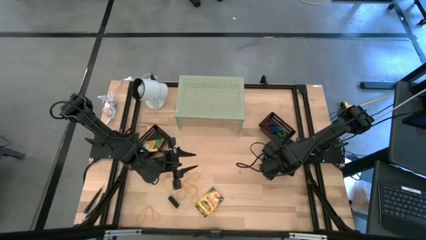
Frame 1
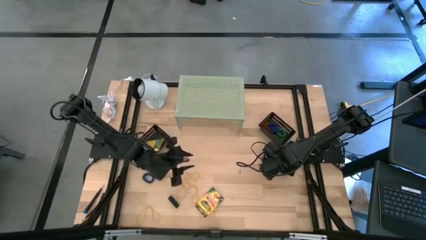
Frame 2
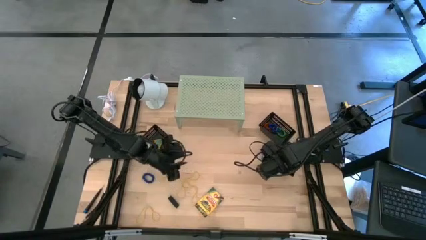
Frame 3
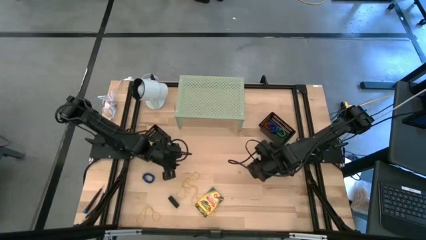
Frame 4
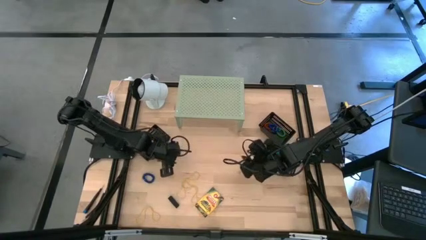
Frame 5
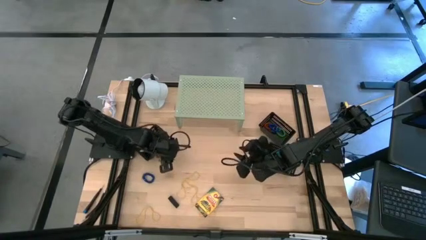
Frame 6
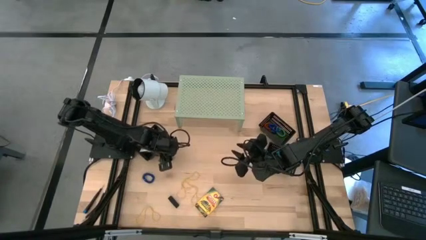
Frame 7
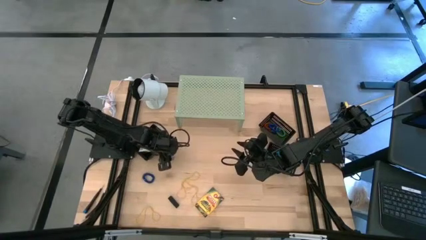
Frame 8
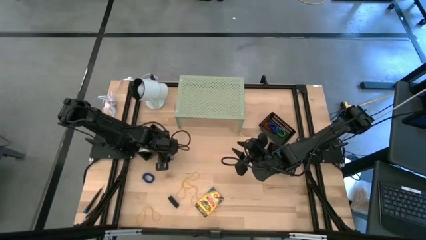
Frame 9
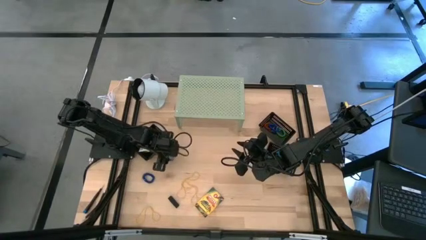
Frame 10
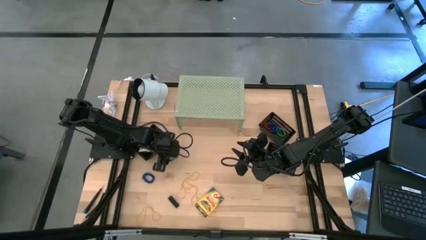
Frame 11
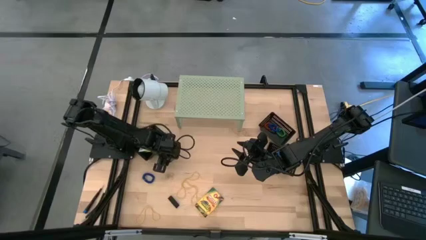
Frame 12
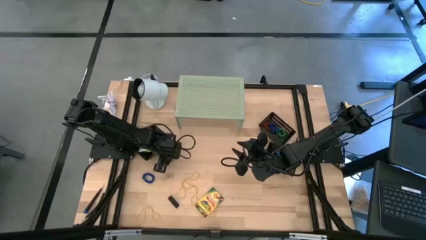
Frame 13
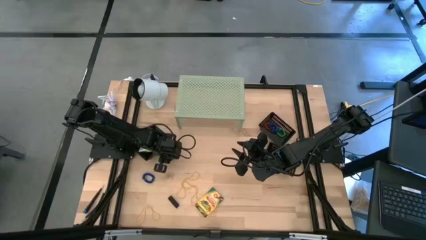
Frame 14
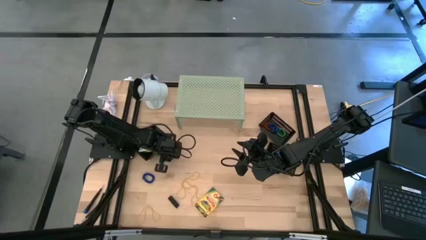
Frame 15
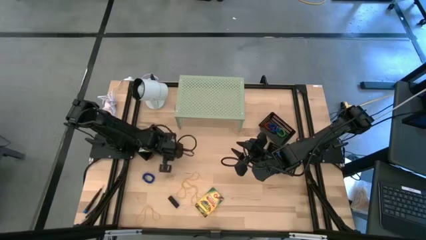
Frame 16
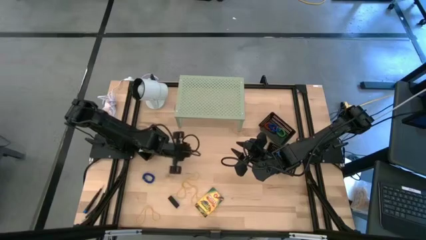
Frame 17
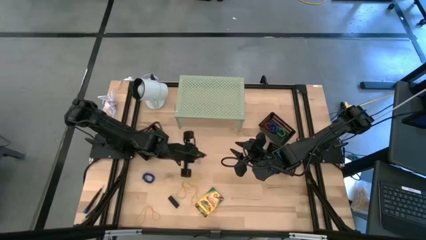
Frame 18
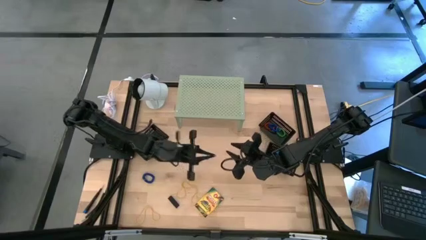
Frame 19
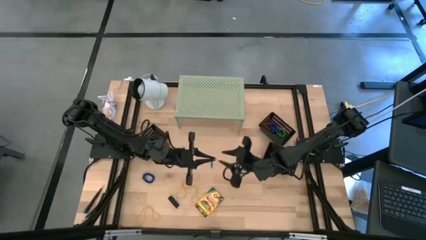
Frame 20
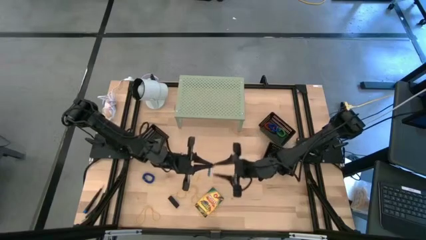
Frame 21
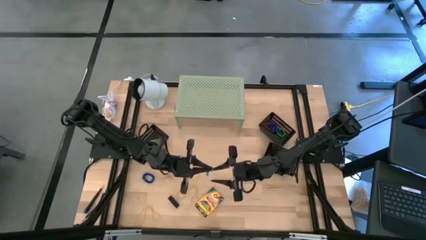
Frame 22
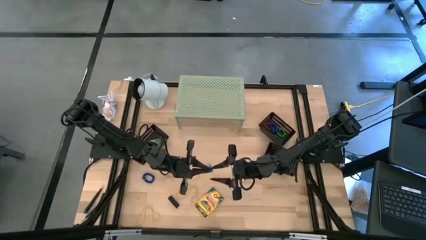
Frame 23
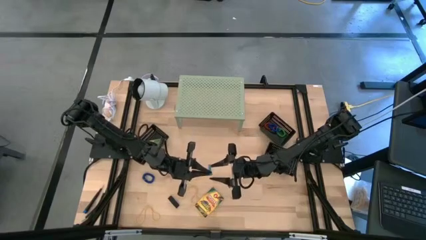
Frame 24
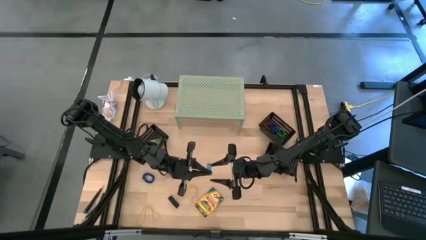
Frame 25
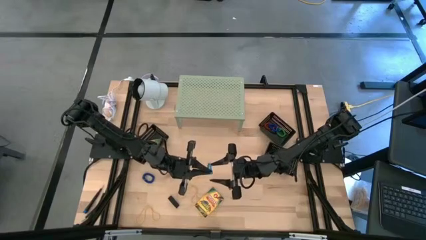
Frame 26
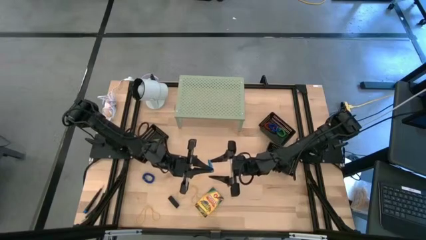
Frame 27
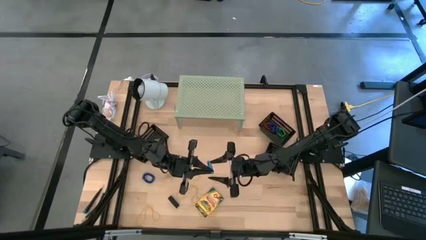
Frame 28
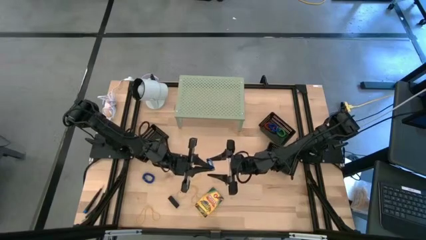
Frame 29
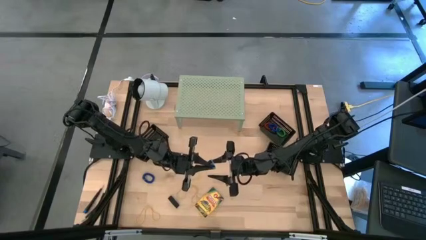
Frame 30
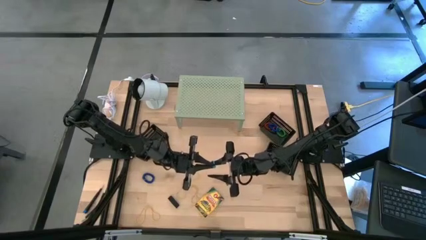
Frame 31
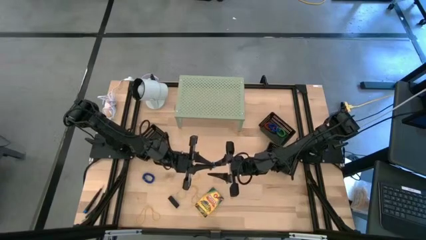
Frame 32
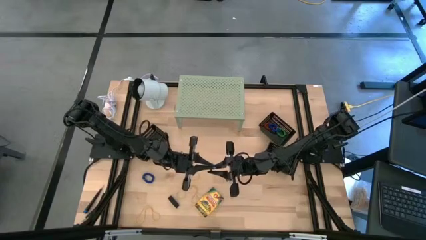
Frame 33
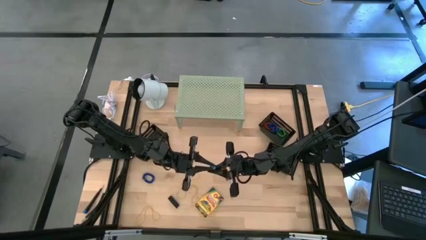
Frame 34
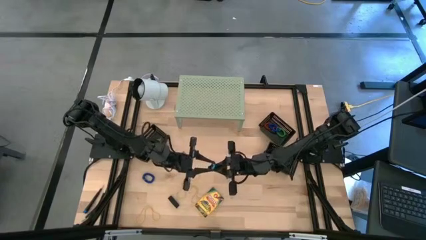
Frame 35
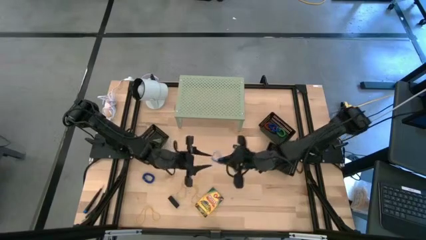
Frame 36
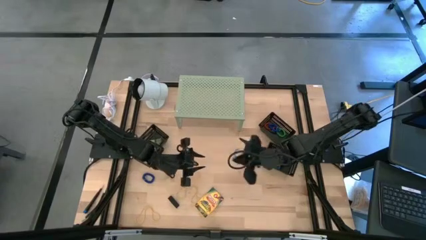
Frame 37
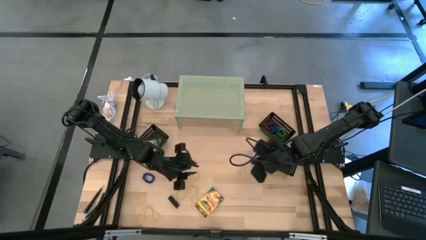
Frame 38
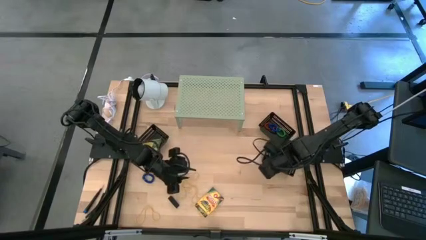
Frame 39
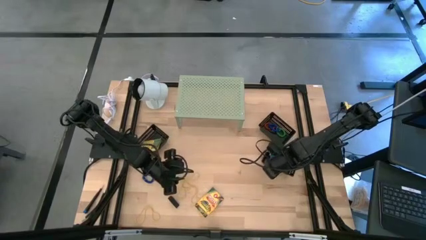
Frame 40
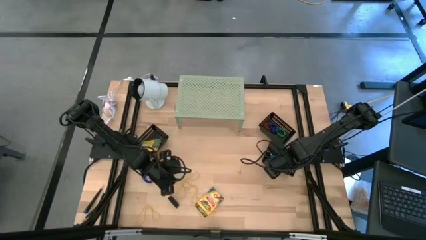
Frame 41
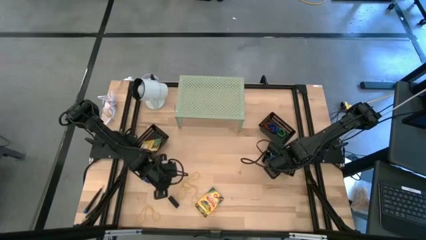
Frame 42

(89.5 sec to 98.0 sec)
Task: Pick & Place Office Desk Supplies
Put the blue rubber band into the bottom right black bin

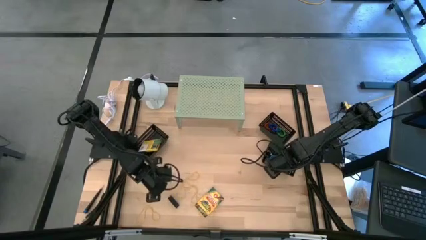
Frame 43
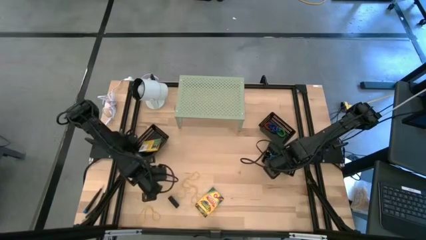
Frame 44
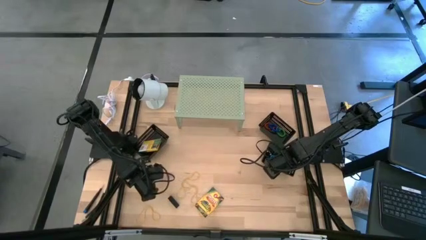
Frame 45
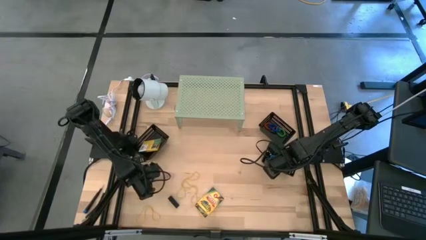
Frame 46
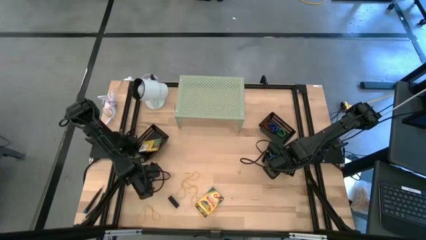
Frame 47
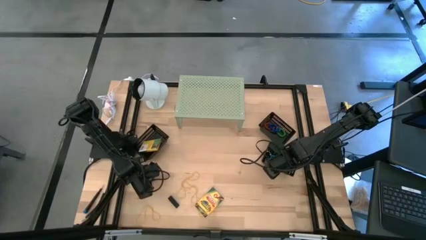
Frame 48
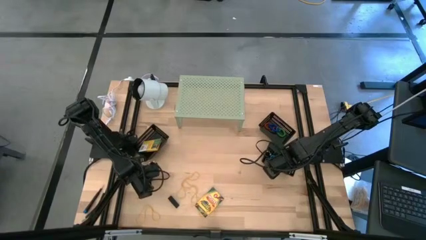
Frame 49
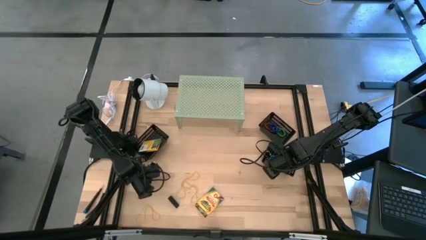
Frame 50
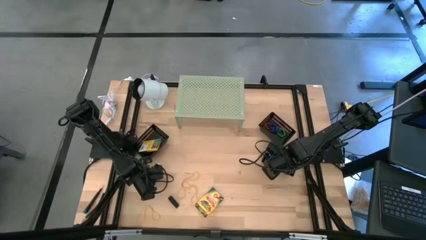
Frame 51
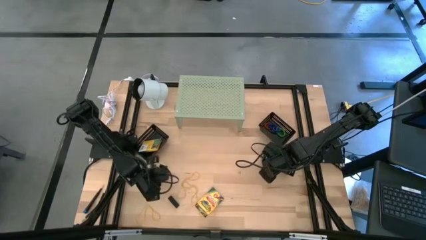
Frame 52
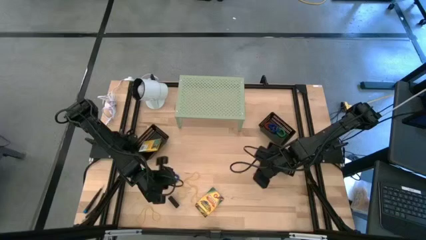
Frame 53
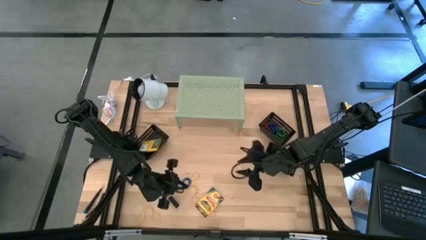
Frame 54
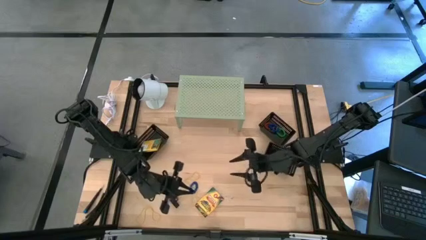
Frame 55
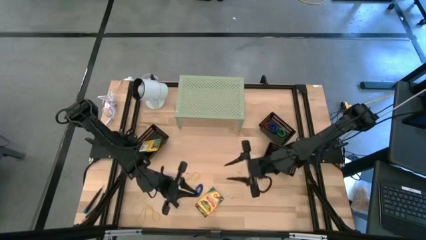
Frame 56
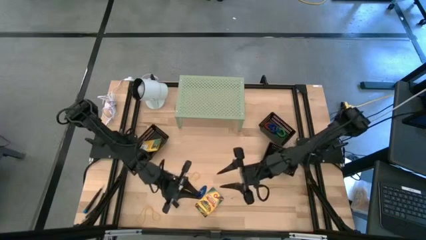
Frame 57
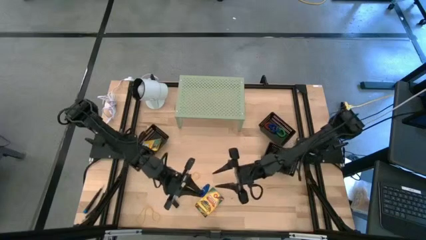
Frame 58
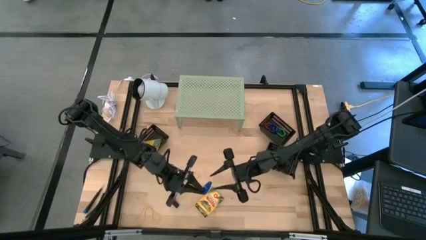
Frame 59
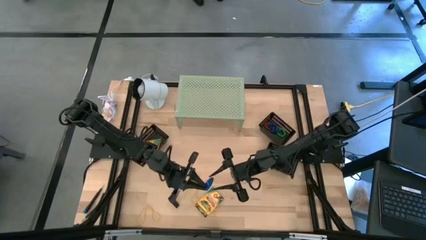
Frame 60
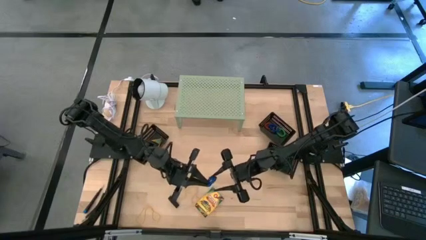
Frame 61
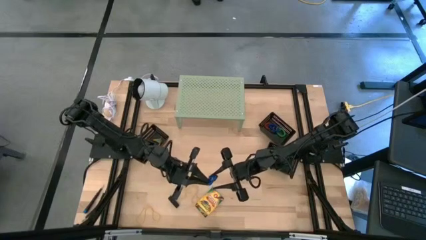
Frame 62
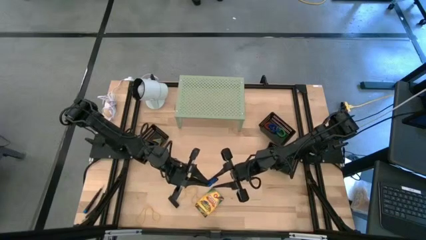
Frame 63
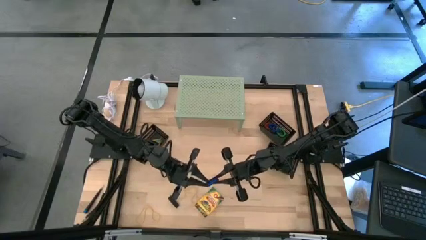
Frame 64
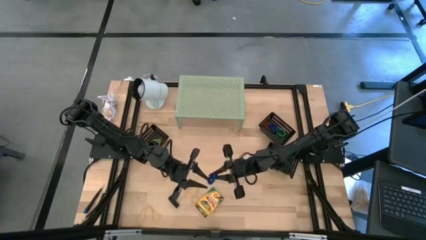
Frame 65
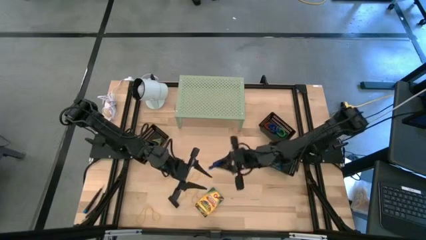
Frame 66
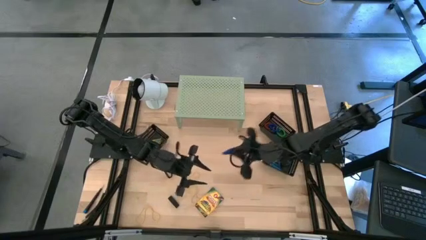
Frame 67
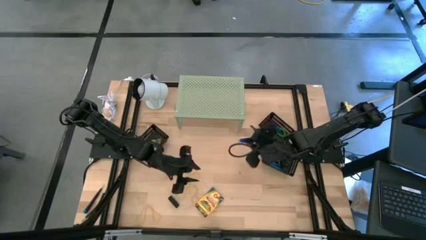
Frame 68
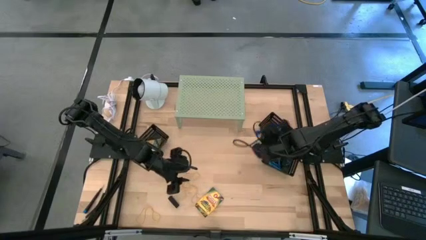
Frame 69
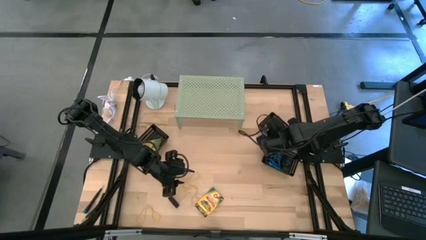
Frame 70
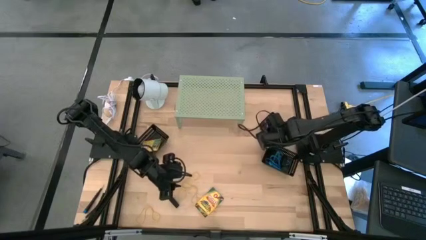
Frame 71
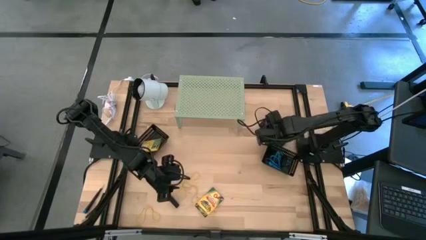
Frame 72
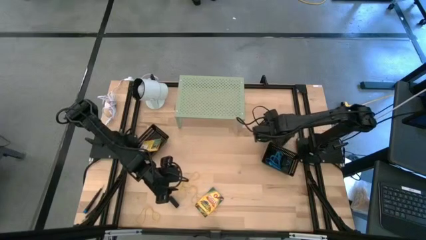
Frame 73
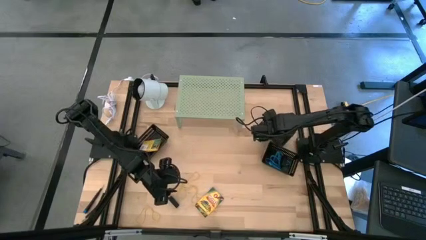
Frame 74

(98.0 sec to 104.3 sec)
Put the blue spring keychain into the top black bin

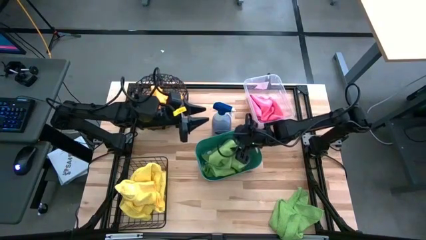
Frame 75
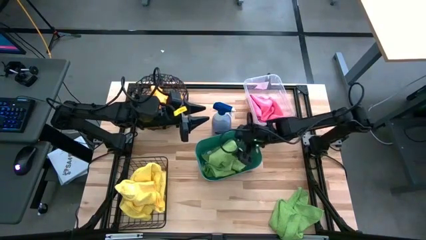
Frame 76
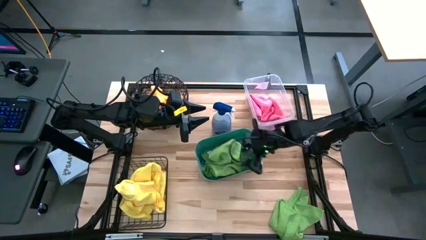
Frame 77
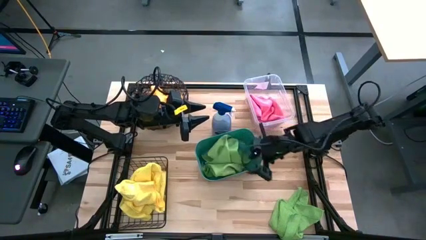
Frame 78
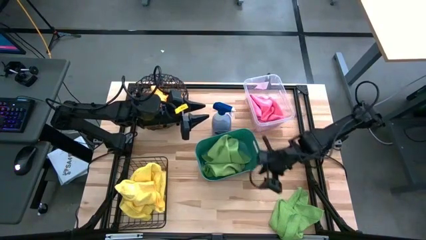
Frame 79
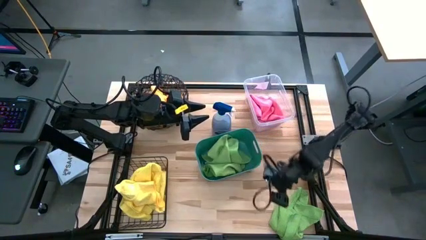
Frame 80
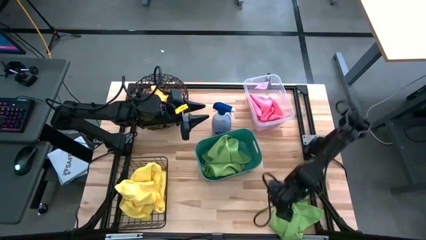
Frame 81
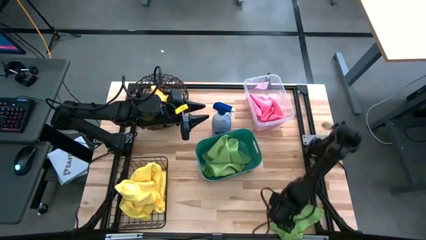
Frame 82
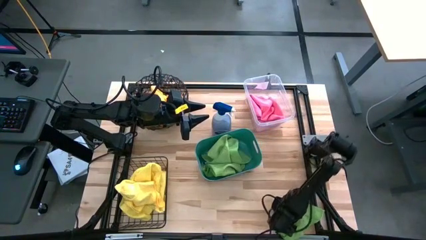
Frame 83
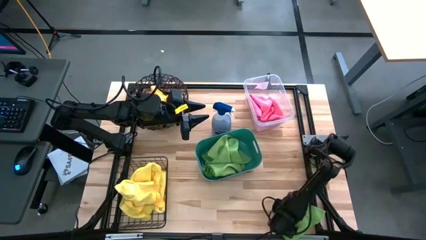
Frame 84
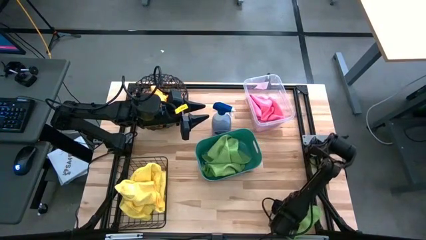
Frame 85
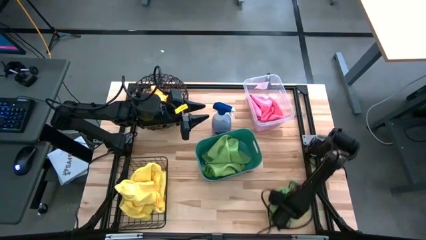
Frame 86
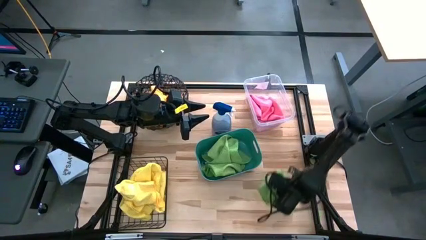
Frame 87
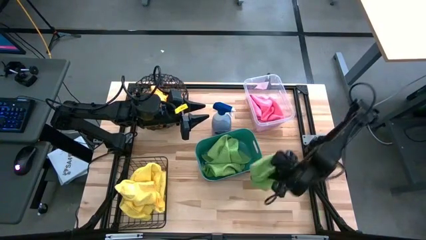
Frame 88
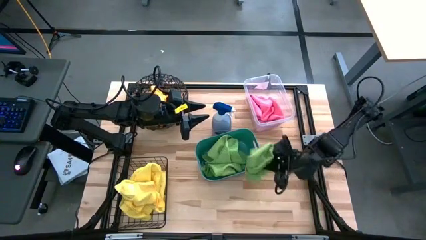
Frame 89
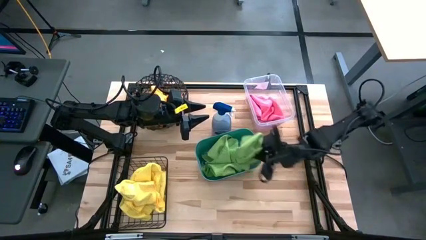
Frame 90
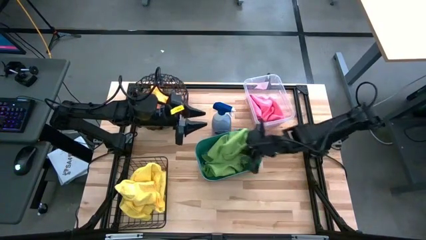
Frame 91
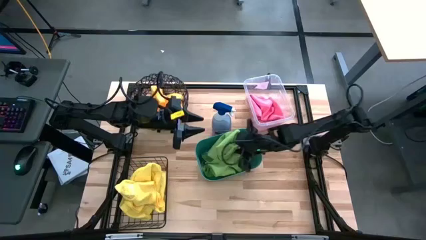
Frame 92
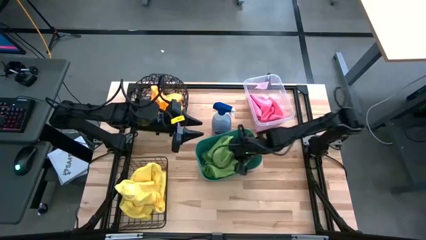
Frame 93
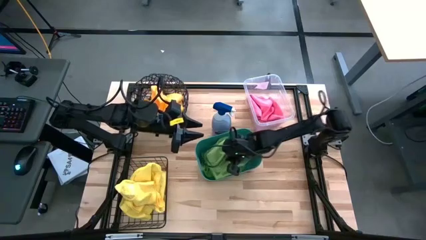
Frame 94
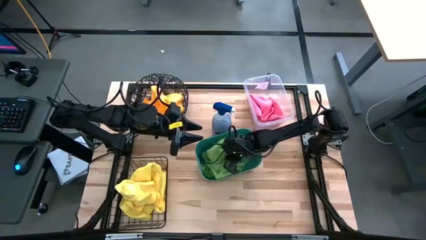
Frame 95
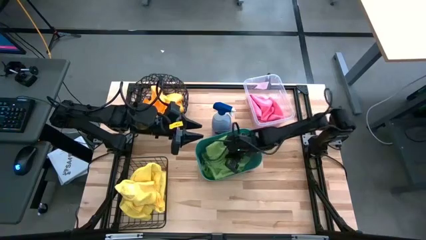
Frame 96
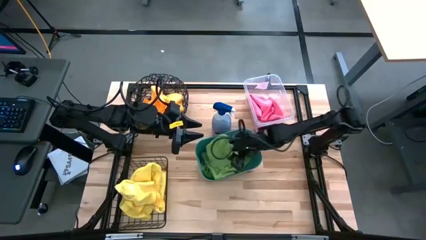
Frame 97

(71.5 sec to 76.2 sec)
Task: Sort microfiber towel by color & place in baskets
Put the green towel into the green bin
